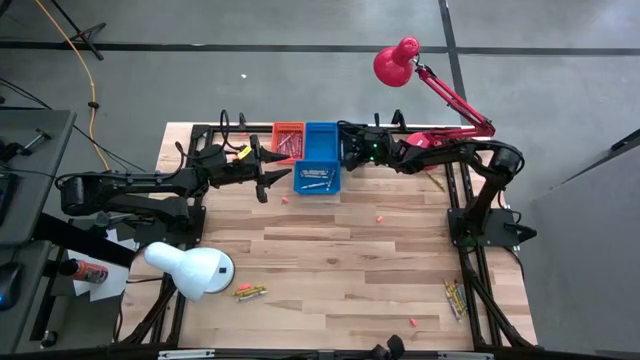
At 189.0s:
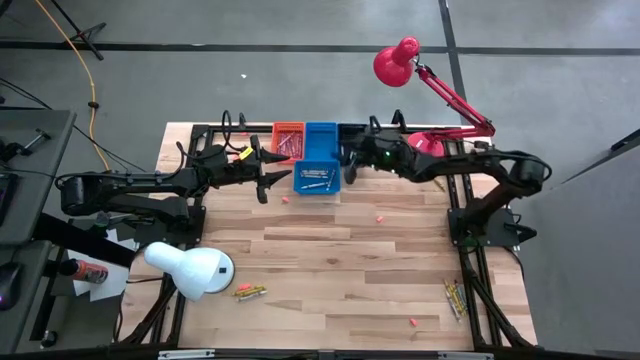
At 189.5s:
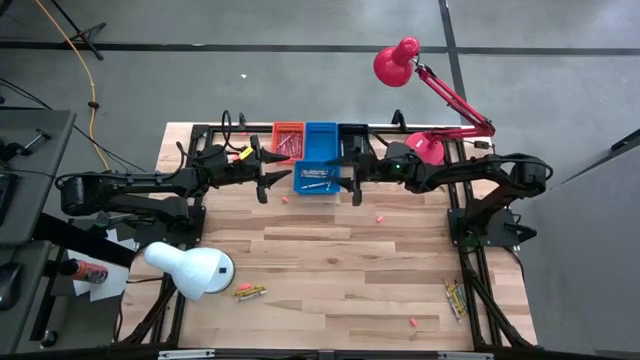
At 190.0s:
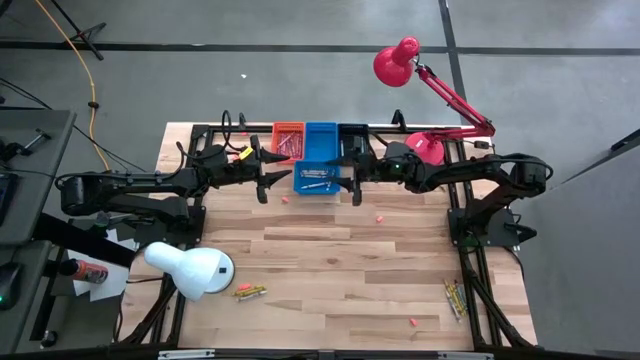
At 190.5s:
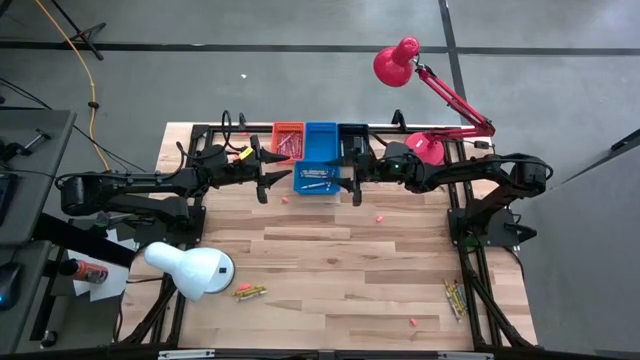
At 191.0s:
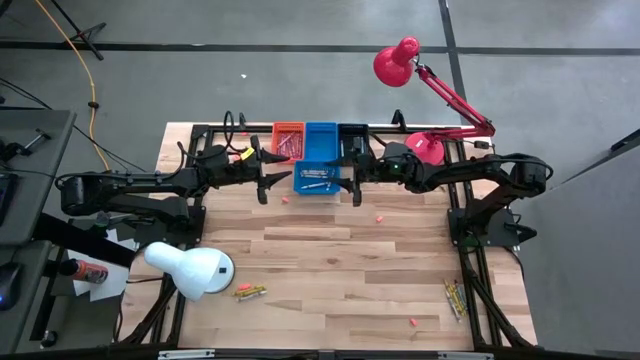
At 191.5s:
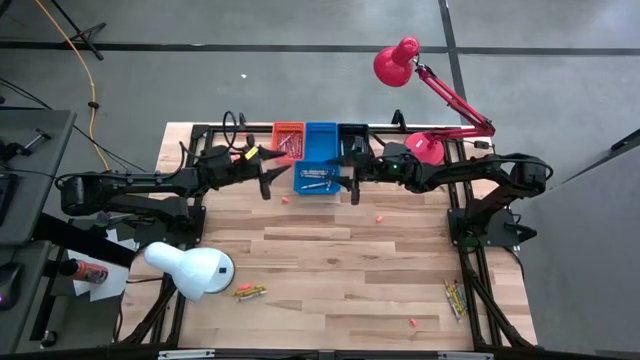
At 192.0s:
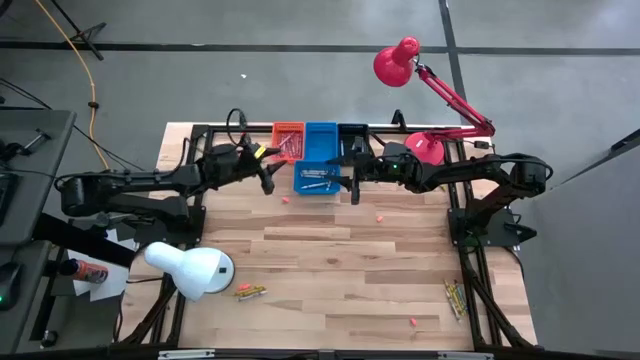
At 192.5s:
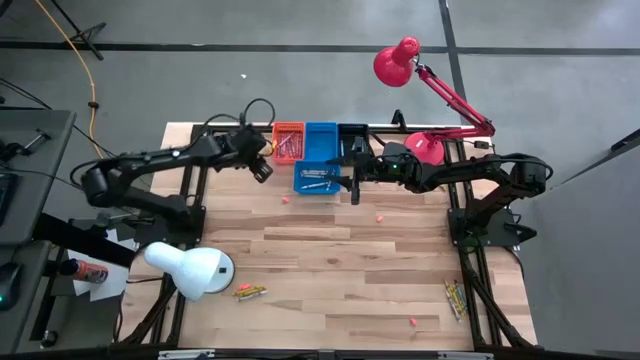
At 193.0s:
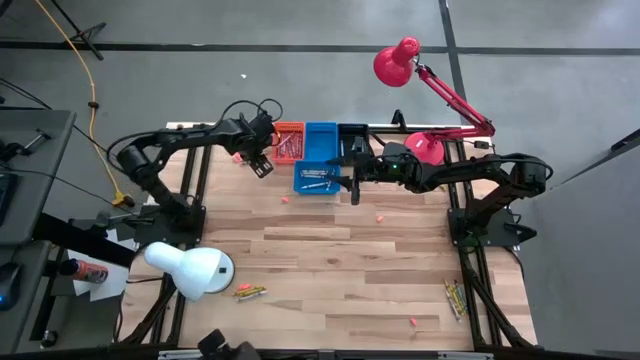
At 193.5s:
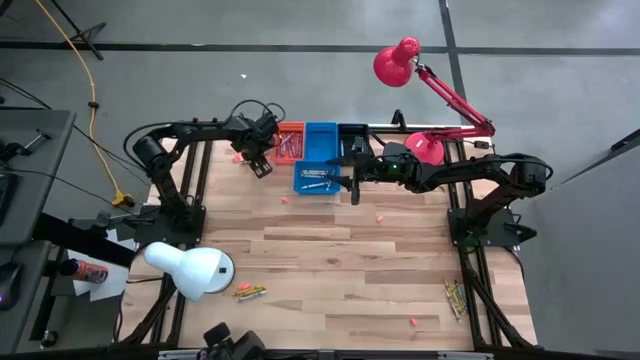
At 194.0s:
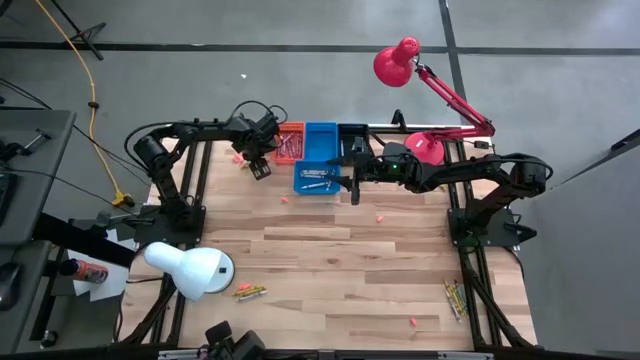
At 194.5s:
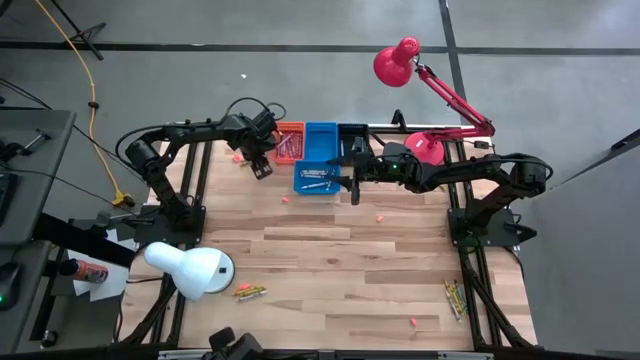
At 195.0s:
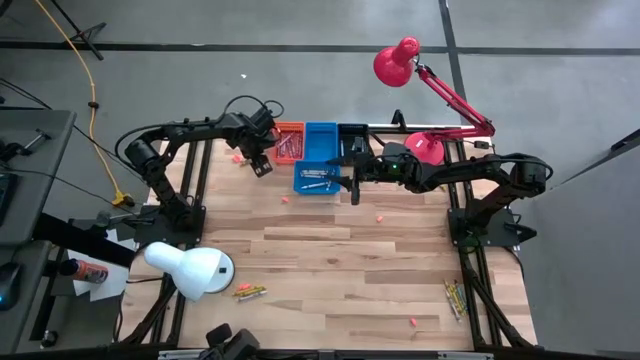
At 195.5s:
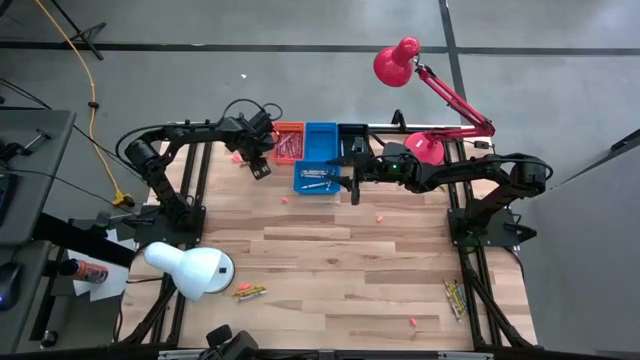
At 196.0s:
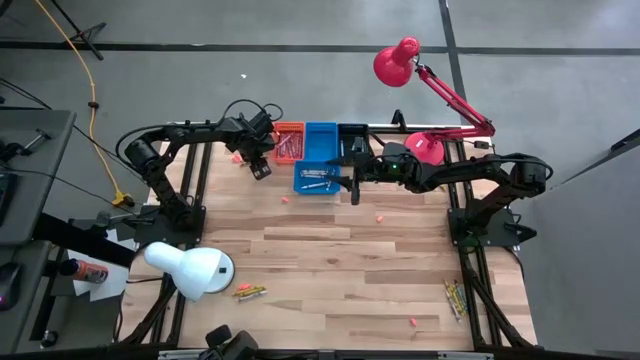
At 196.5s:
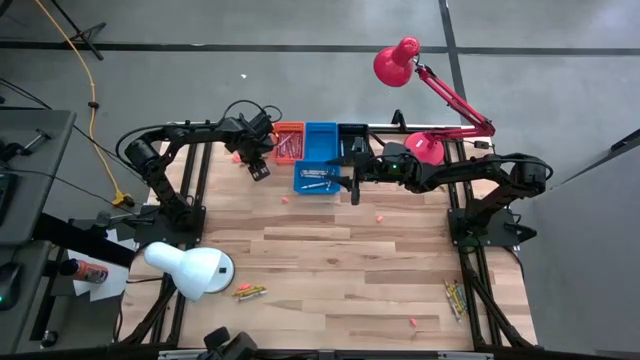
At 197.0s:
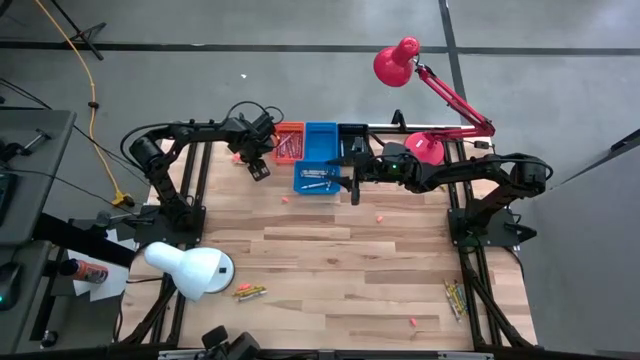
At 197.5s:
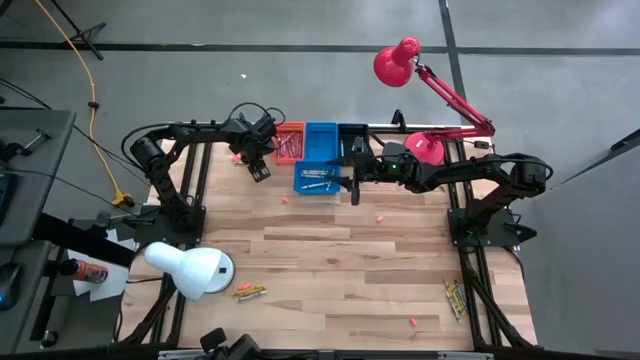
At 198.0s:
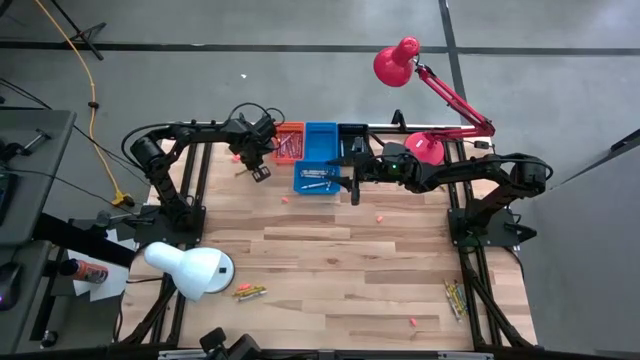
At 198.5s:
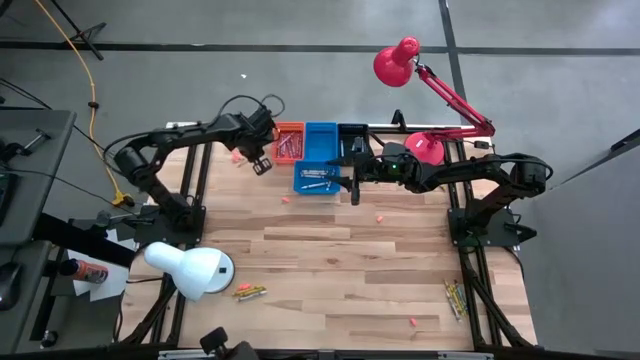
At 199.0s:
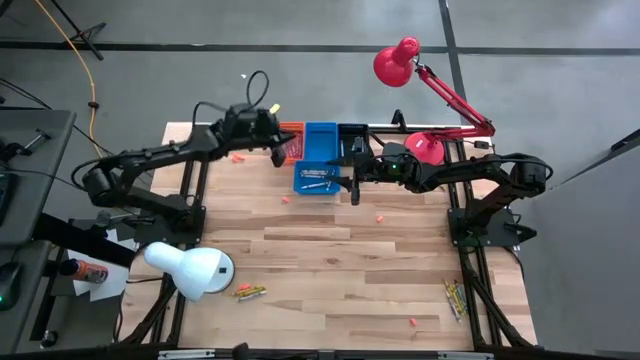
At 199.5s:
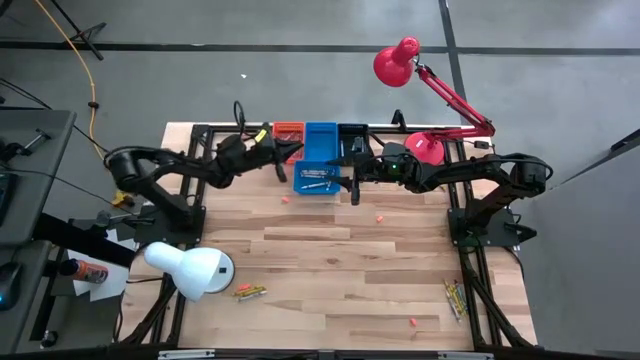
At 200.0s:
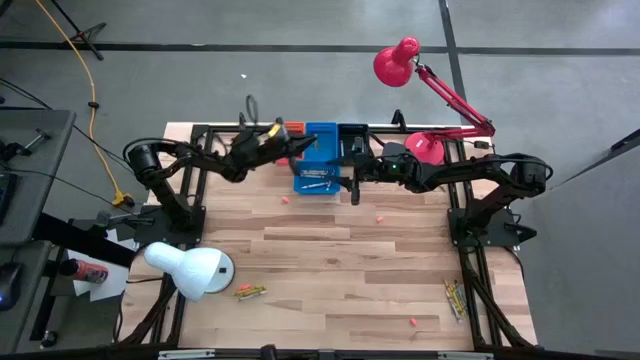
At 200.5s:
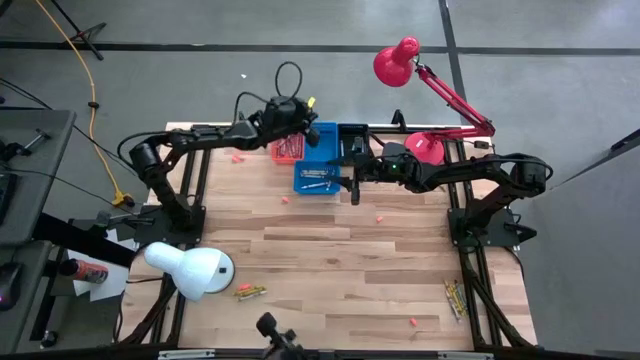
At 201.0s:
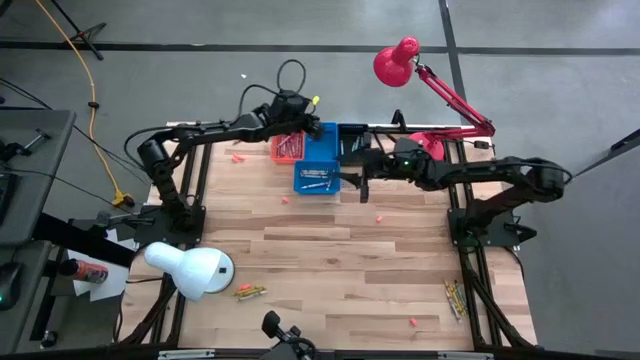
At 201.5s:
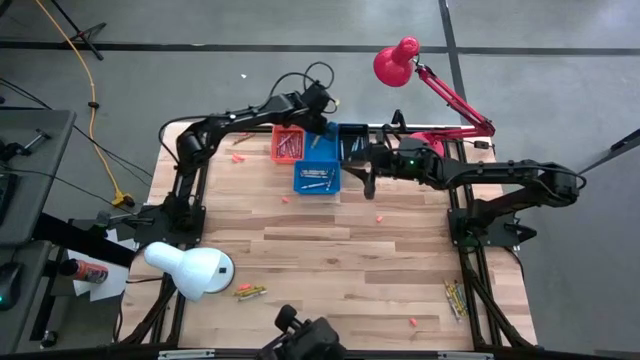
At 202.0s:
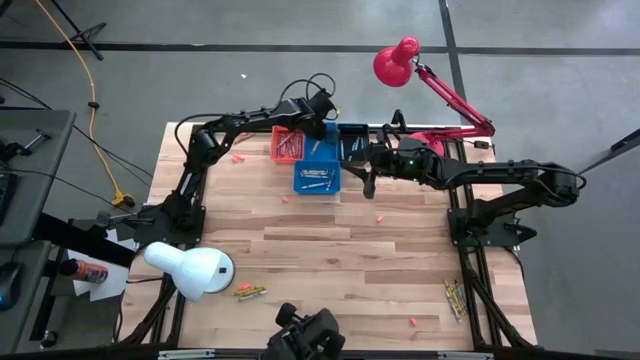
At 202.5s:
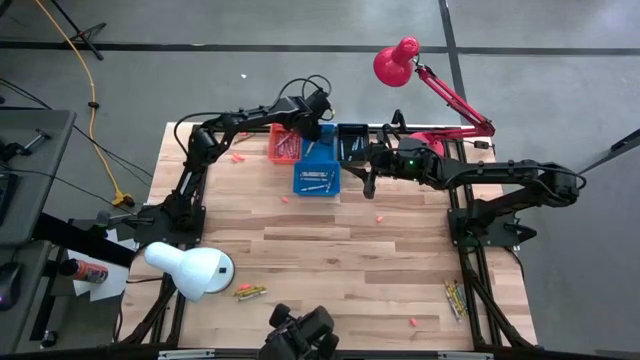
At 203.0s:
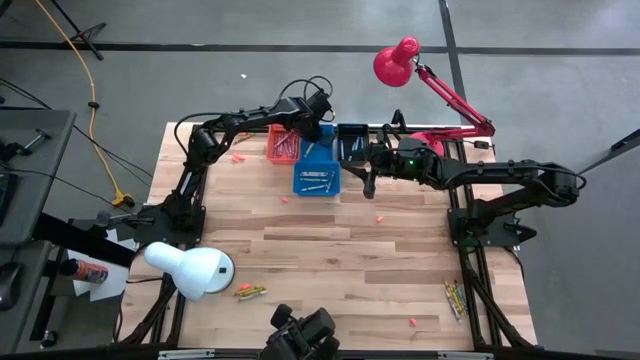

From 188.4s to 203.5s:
Task: Sort crayons
Put the yellow crayon into the top blue bin

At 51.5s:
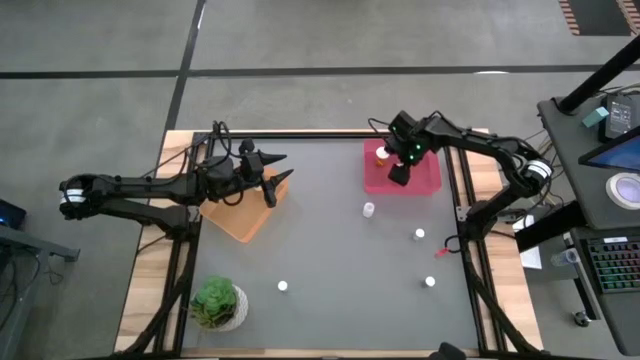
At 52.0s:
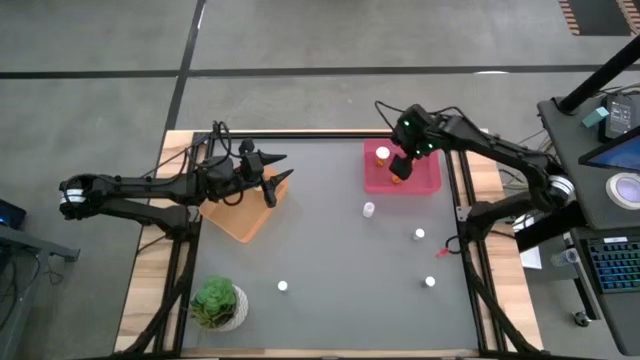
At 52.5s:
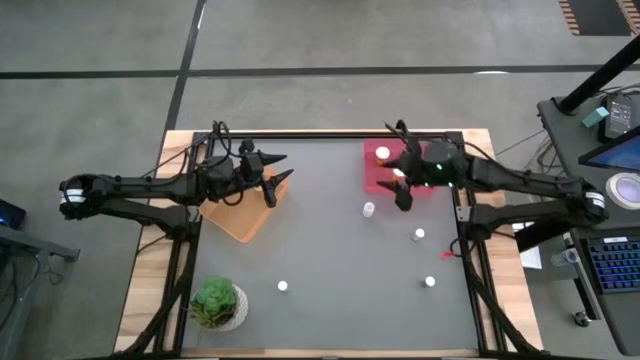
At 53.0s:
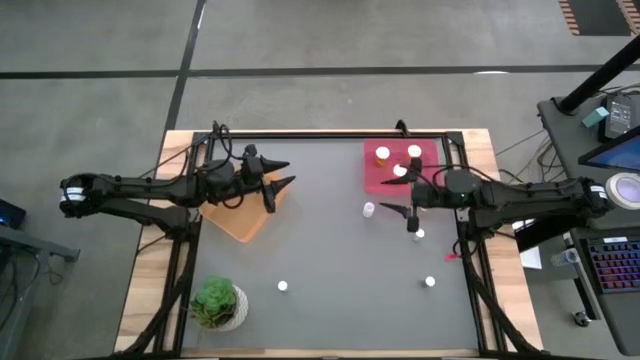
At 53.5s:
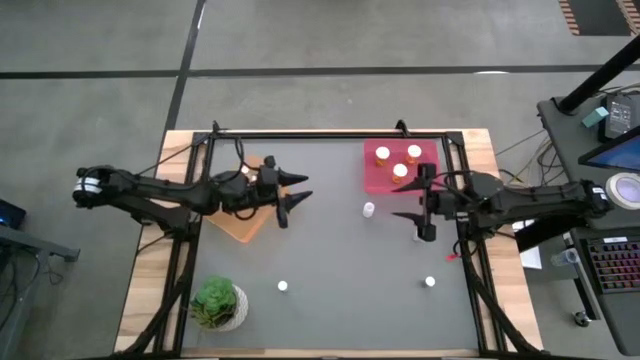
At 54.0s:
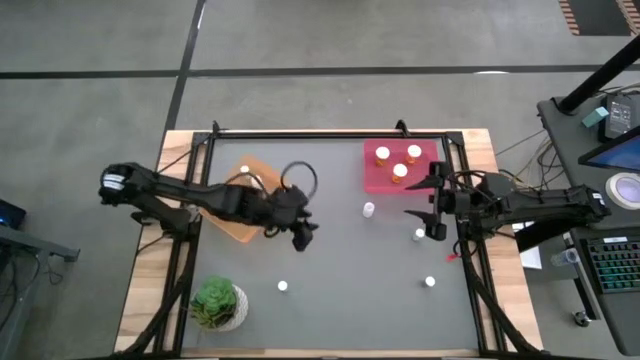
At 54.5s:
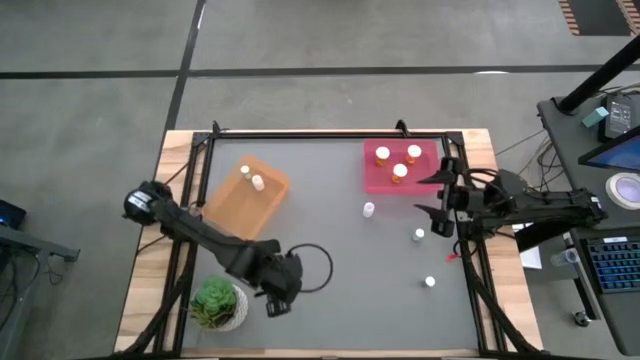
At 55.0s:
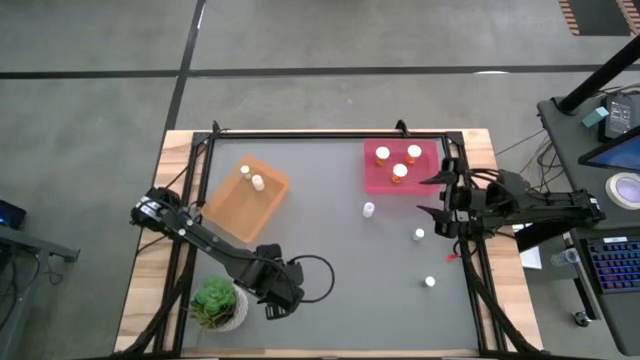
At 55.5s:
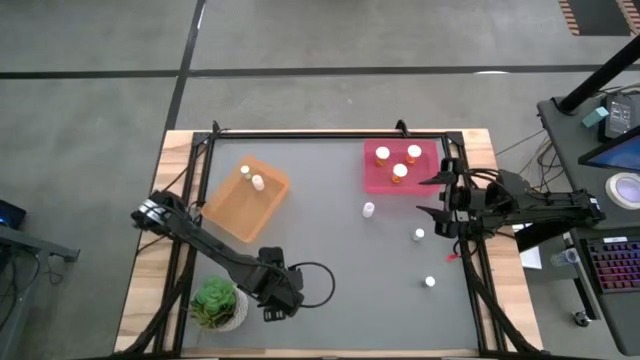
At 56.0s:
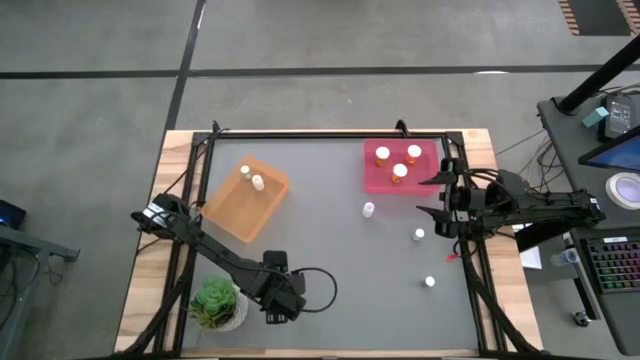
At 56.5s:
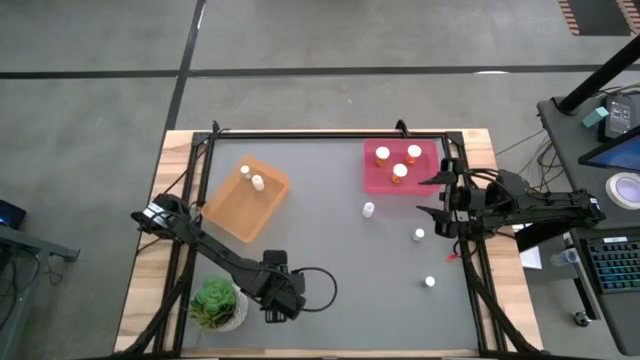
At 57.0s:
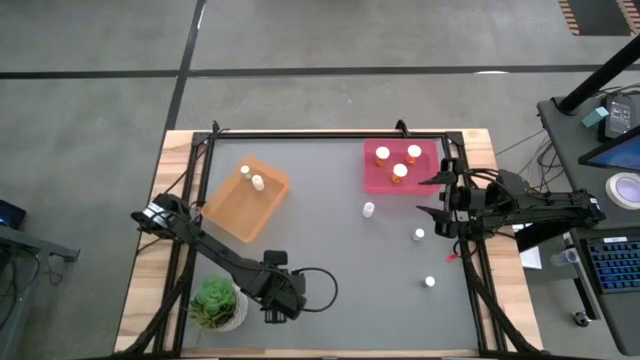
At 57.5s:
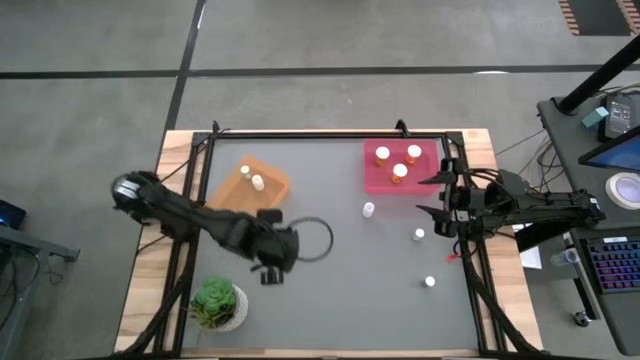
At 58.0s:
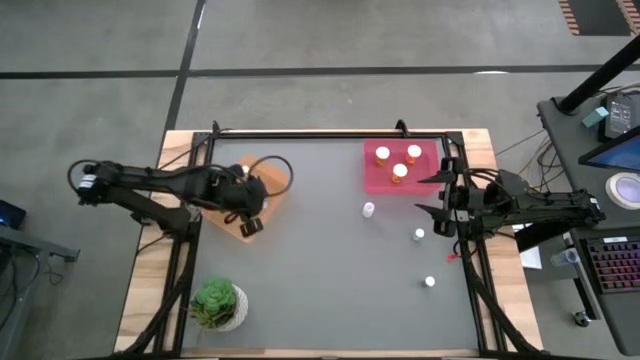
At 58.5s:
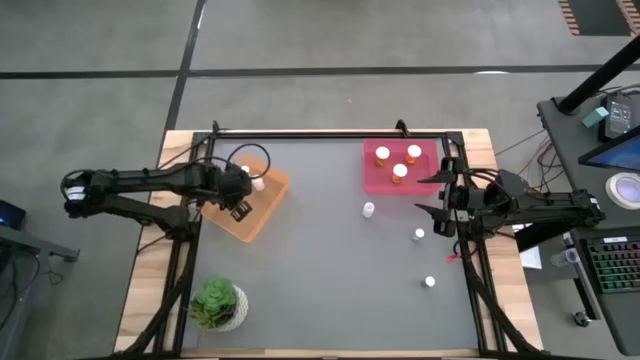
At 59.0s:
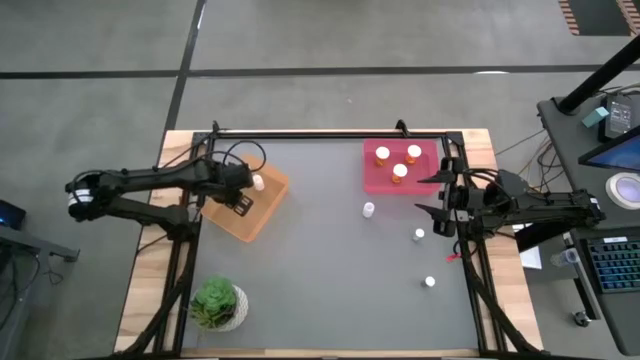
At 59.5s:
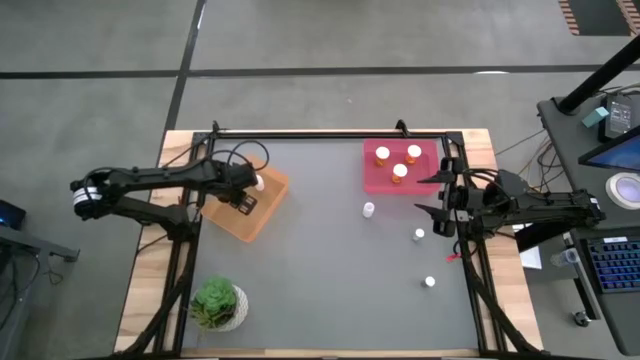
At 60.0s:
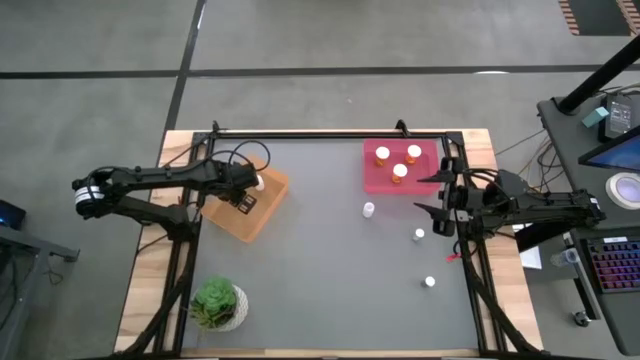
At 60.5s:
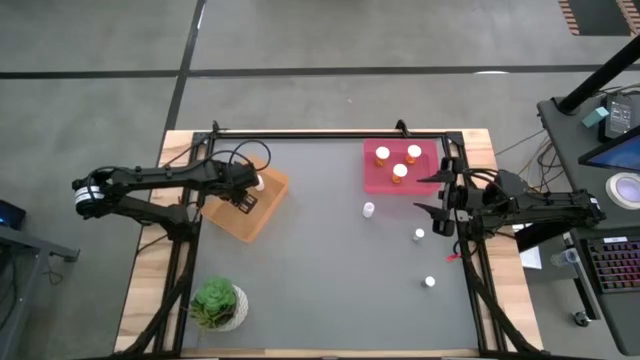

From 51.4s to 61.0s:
Task: Pick and place medicine bottles into bin by pill shape (circle, oval)
Put the blue tablet bottle into the orange bin
